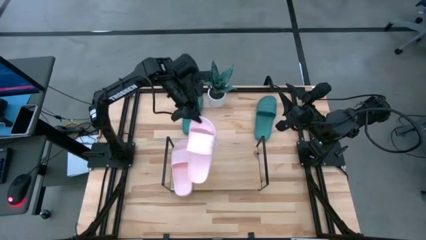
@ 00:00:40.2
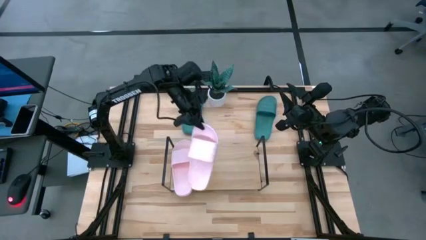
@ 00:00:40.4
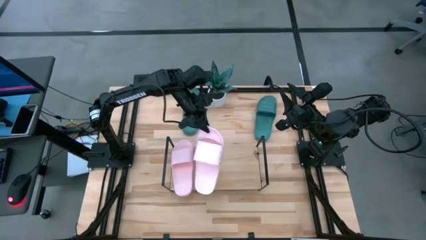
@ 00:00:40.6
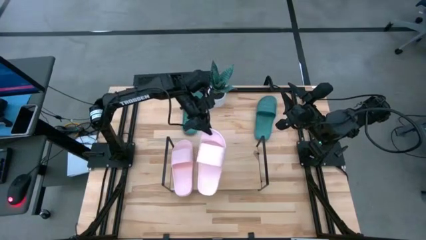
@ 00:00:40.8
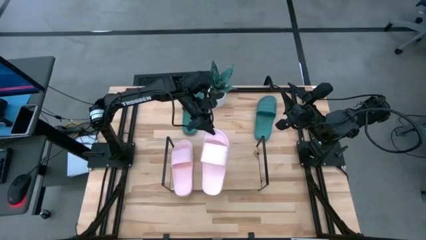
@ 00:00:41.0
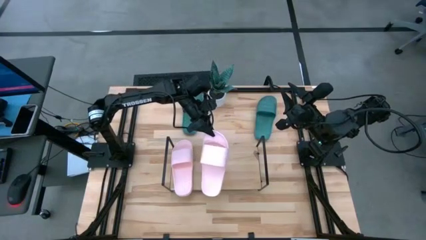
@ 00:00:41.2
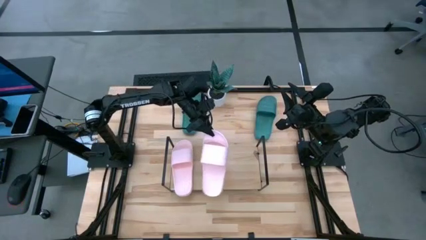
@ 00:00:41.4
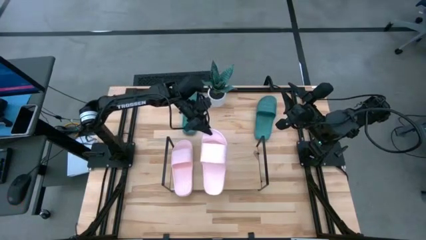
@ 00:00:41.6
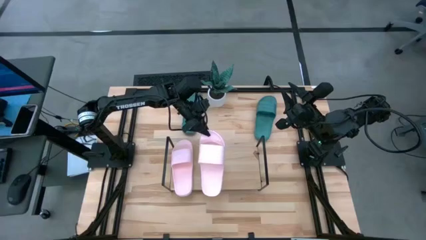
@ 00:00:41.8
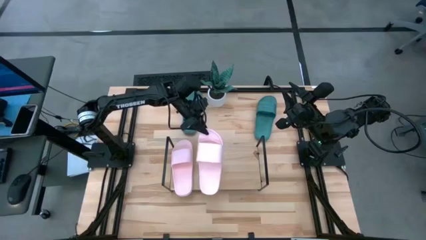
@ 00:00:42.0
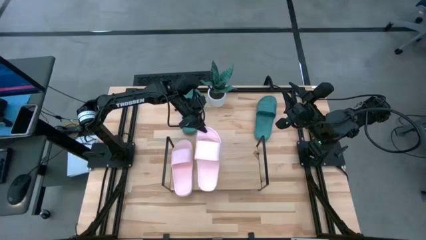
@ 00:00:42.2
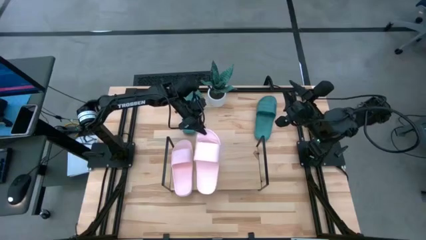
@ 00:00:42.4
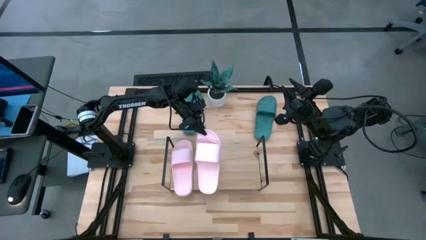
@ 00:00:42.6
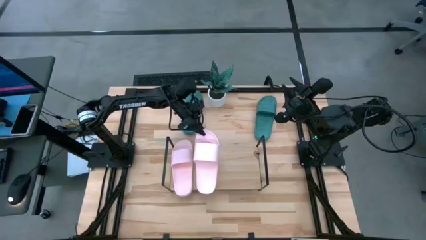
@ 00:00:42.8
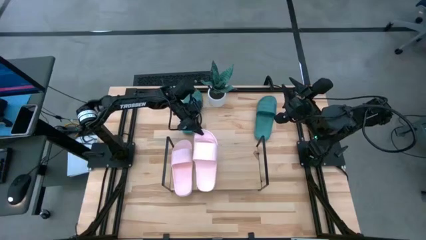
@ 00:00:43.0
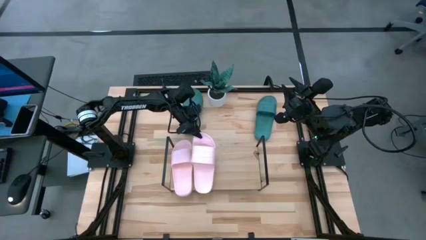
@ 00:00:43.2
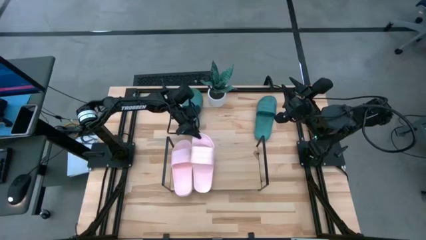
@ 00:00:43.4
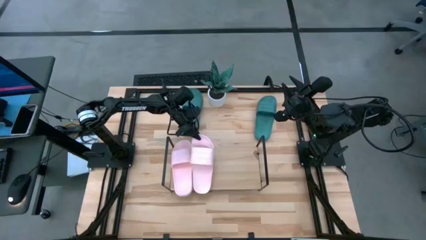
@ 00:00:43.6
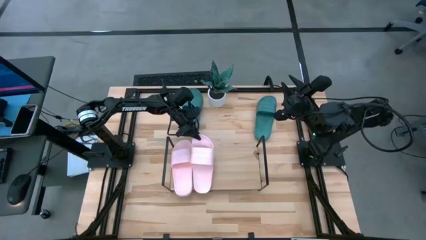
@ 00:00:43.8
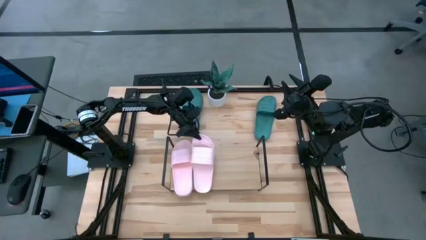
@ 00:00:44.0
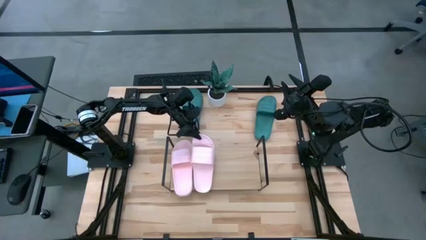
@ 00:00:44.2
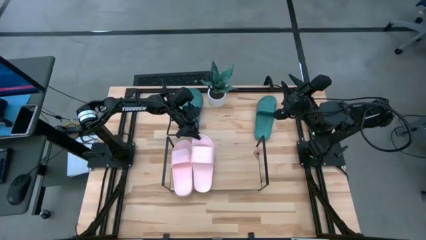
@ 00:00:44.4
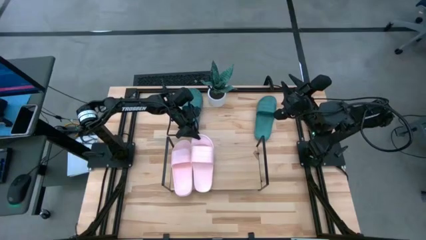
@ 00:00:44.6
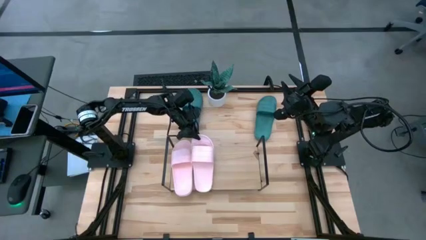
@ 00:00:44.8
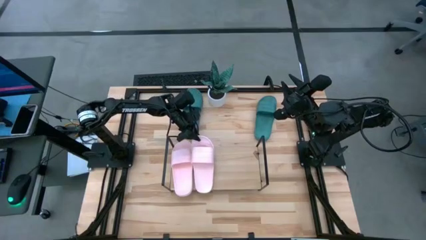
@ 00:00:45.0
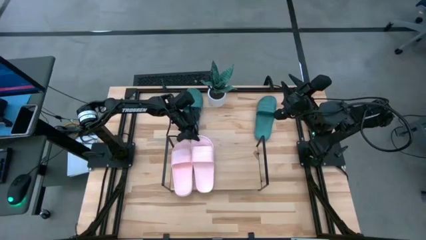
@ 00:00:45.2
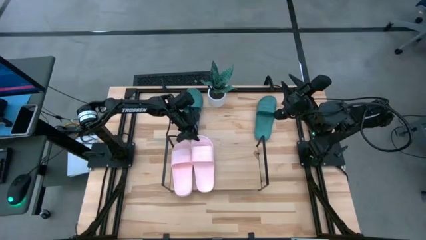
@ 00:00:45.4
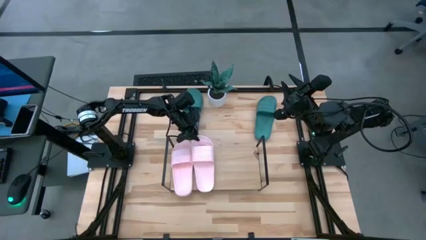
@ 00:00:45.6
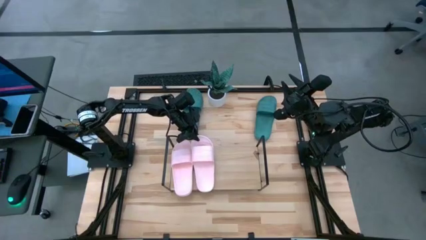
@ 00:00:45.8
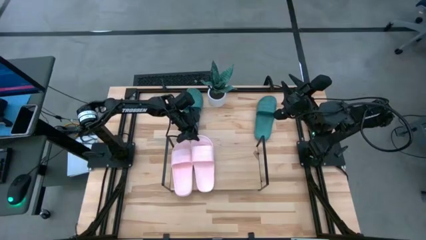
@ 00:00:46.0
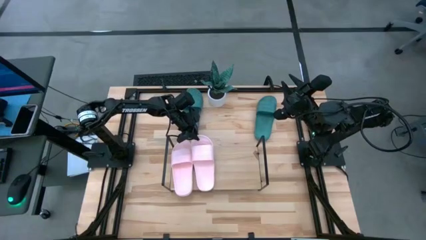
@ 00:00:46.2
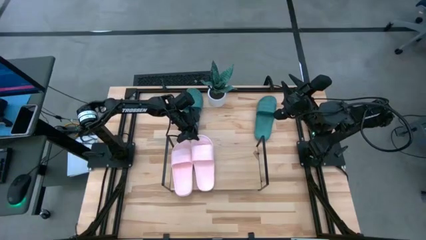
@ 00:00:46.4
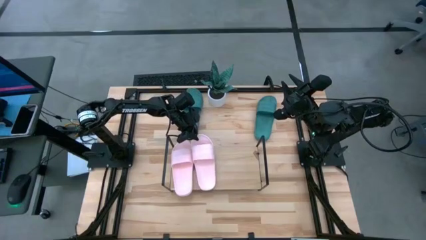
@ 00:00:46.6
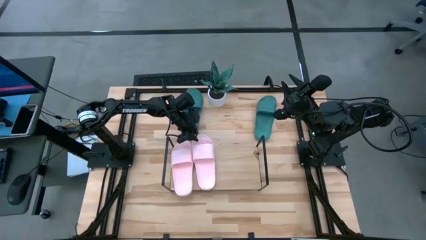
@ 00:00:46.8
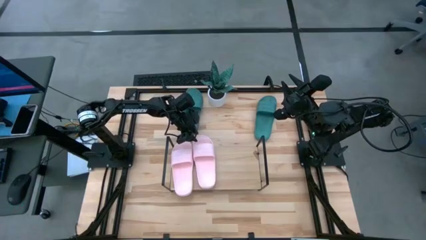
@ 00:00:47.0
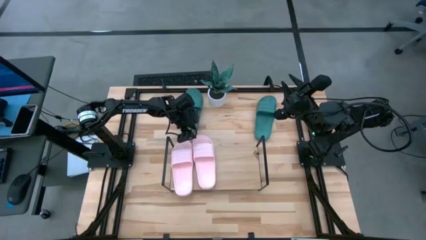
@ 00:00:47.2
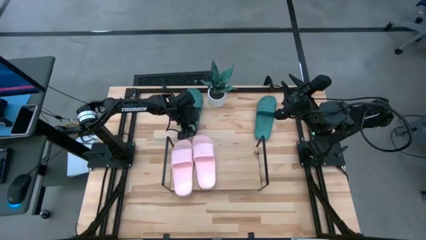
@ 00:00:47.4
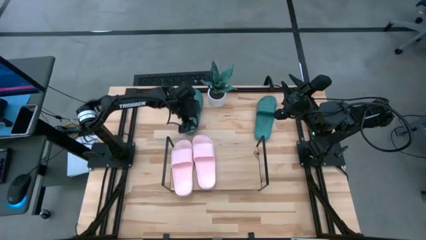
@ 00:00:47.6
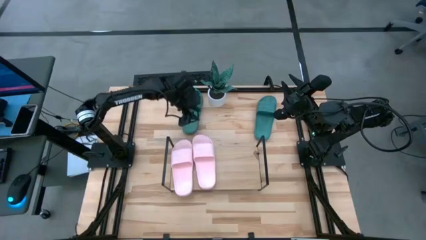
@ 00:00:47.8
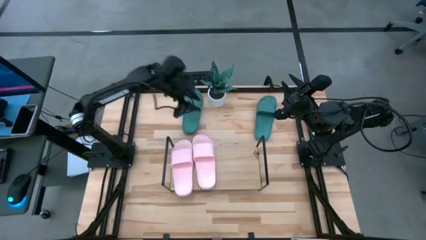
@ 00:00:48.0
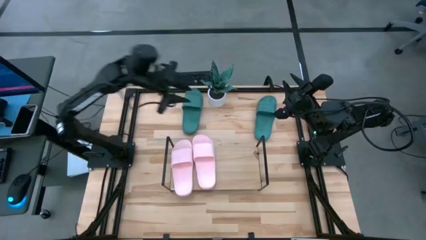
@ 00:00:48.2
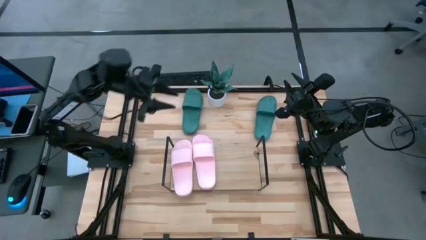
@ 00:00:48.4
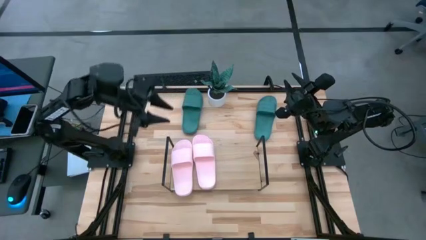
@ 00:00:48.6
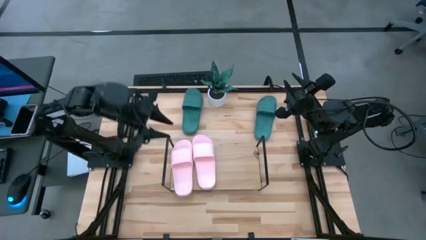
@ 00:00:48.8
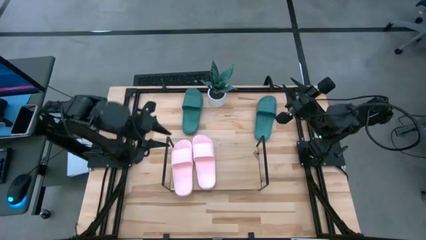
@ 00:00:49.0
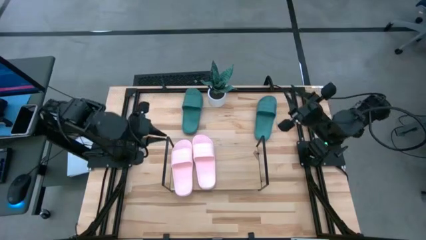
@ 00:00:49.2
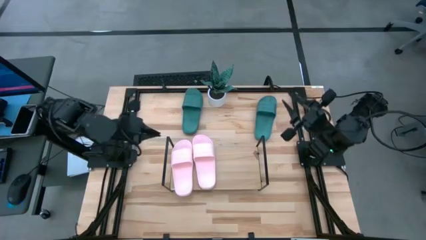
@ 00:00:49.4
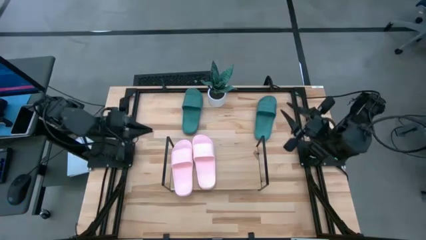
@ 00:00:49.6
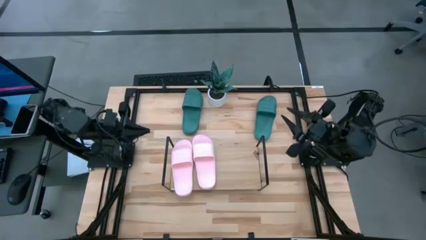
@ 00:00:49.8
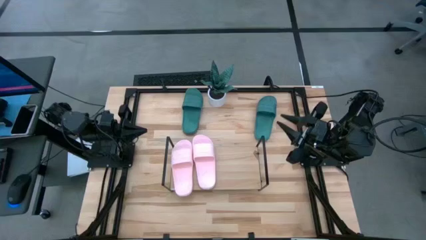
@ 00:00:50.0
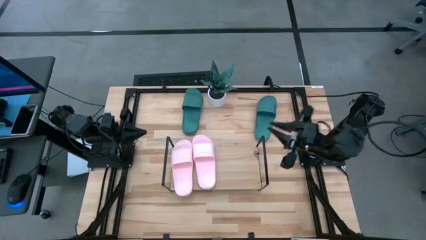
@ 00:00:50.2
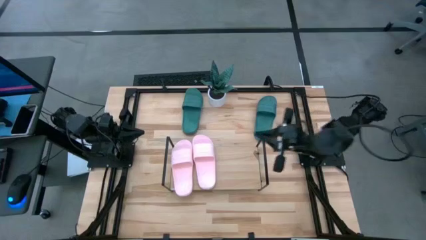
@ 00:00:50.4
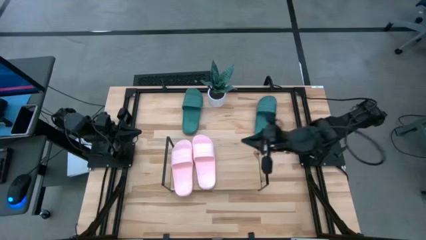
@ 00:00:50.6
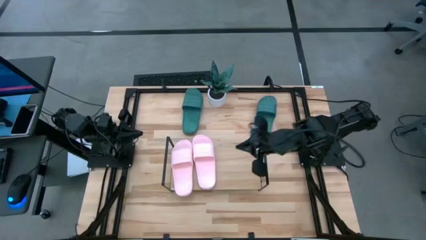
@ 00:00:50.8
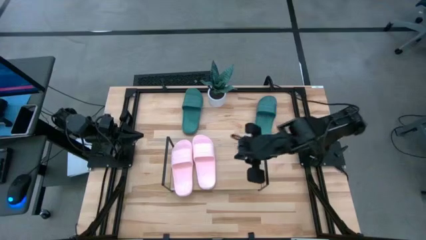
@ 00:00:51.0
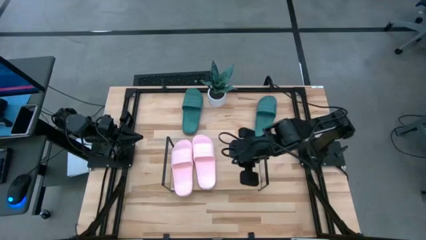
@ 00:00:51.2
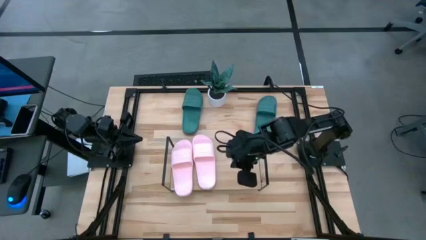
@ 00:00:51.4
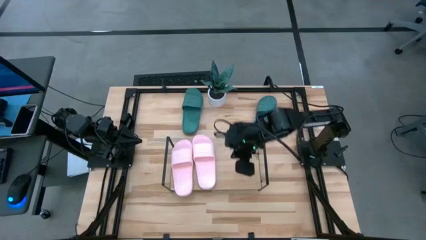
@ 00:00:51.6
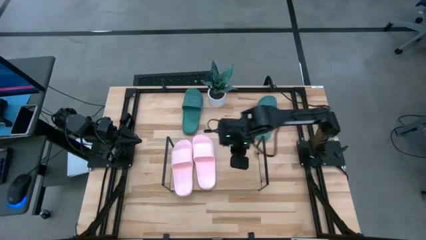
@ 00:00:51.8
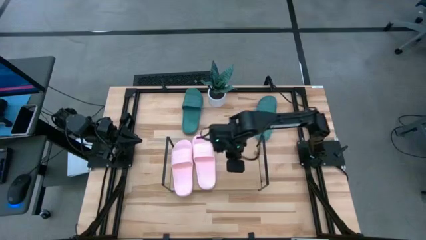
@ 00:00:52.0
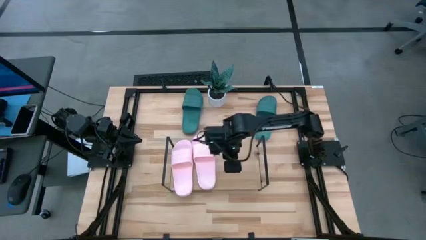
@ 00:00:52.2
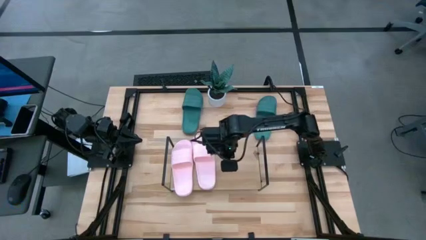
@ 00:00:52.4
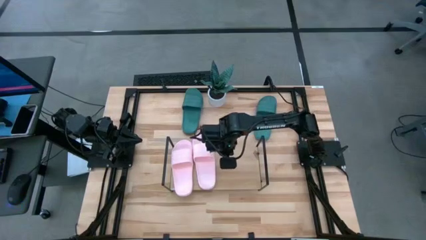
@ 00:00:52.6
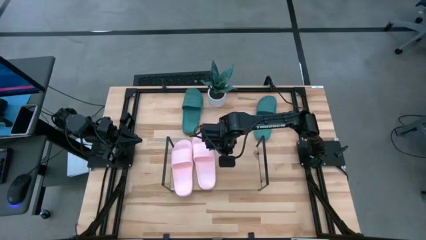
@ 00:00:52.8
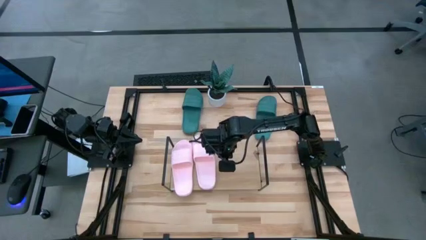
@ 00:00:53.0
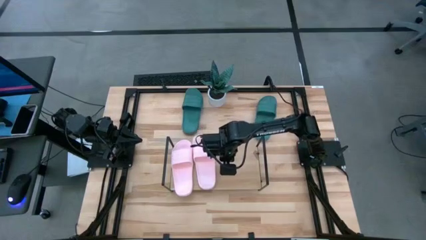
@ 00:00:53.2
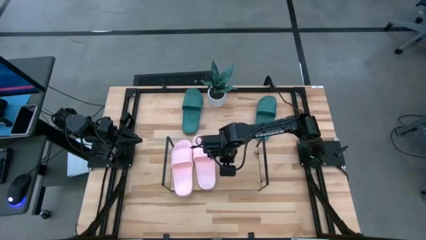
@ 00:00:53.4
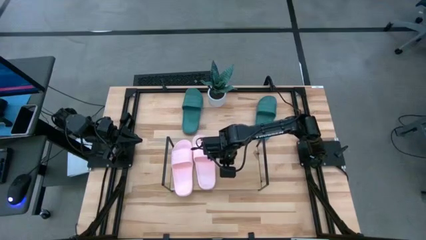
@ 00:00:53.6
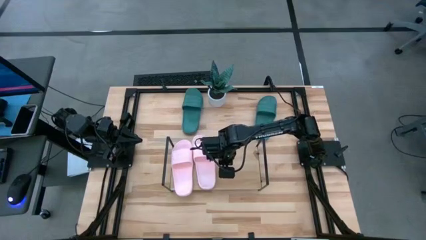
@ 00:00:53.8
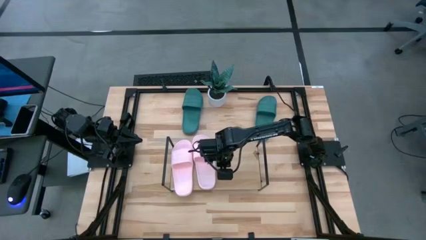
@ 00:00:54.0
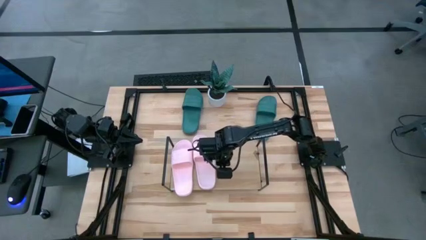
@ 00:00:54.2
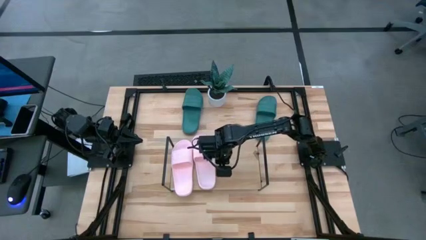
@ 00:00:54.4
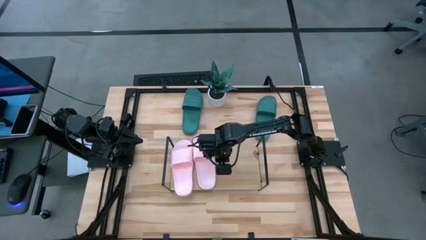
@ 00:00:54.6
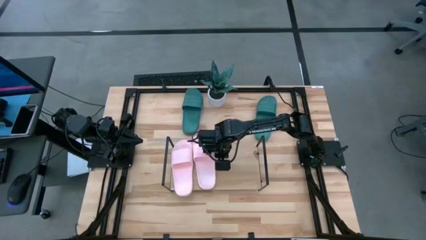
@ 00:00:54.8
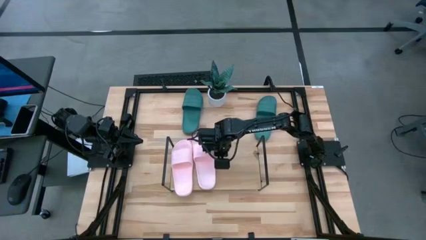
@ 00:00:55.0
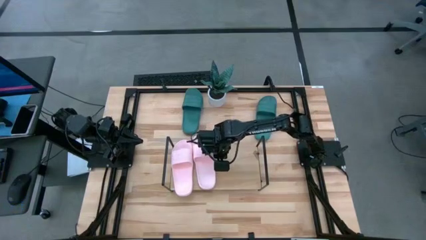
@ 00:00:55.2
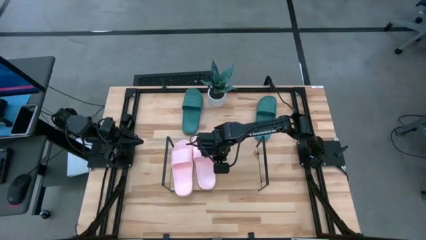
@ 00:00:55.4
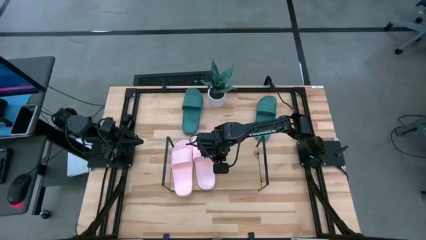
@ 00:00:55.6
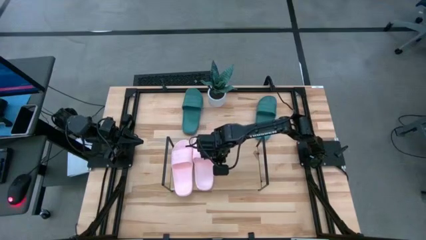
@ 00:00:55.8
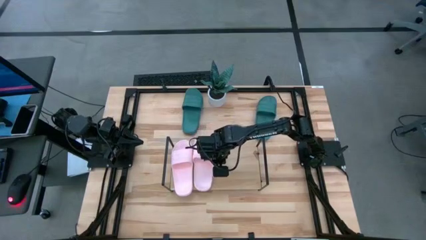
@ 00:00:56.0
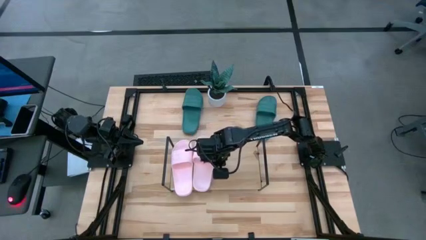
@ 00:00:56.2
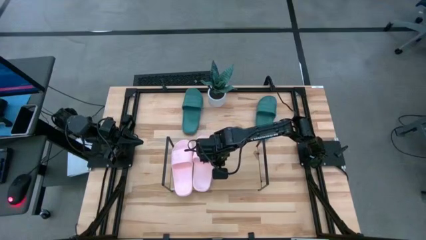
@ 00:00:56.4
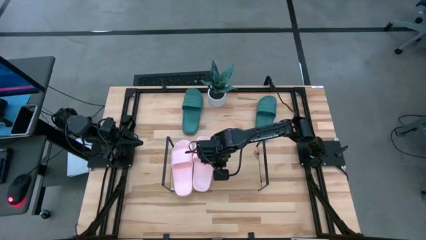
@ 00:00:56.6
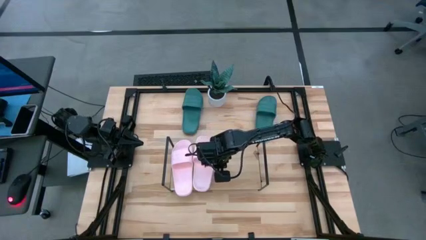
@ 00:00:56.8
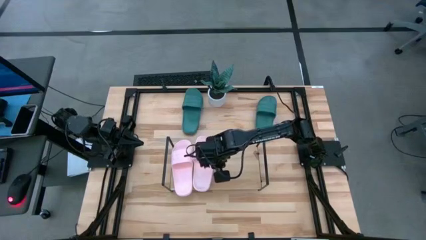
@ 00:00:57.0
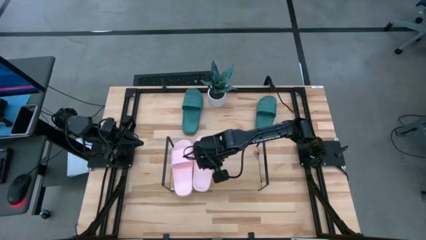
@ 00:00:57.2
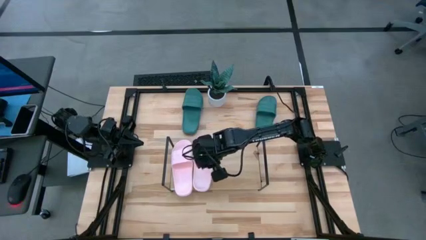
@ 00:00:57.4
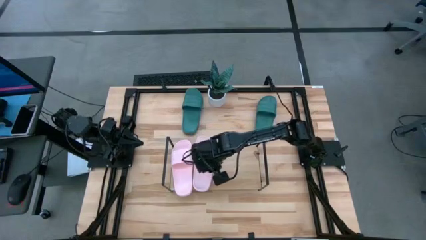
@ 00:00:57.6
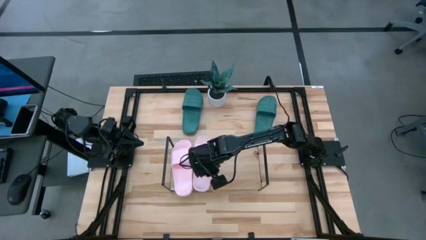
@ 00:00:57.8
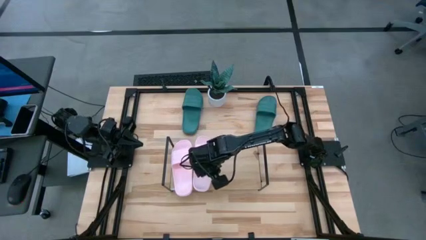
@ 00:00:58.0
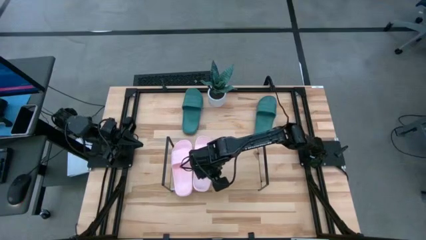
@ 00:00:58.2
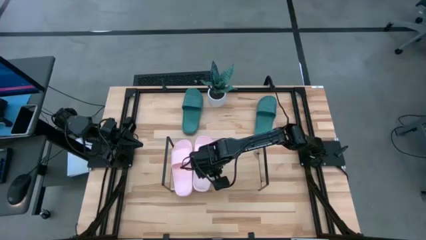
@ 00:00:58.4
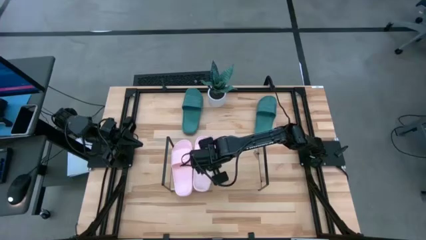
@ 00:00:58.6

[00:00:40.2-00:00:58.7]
Task: Pick and place slides into the shelf
Put the pink slide on the shelf
